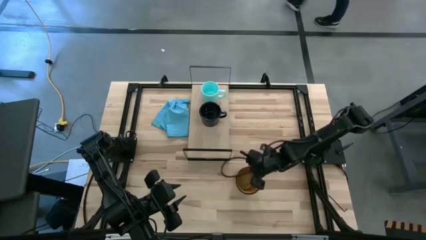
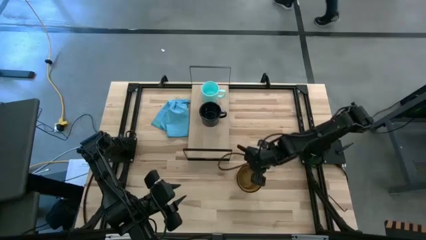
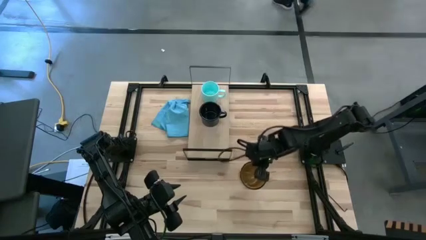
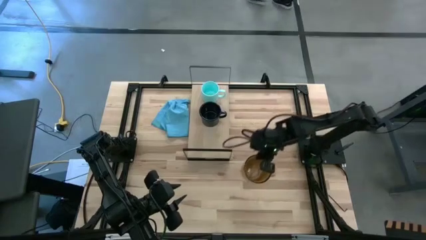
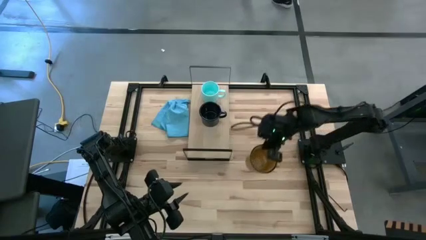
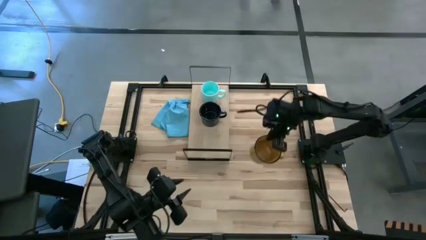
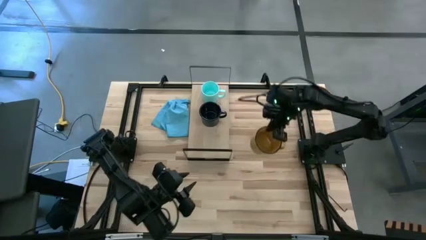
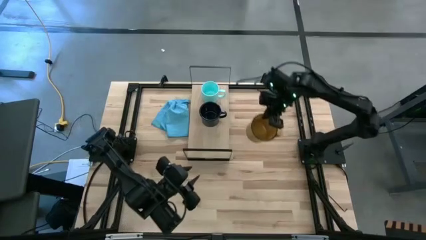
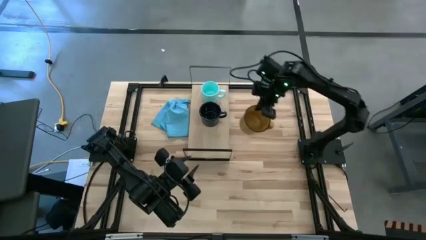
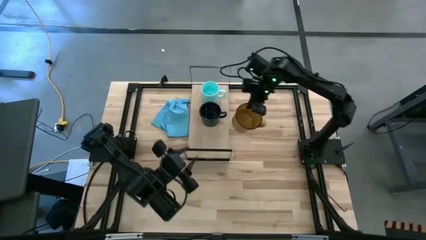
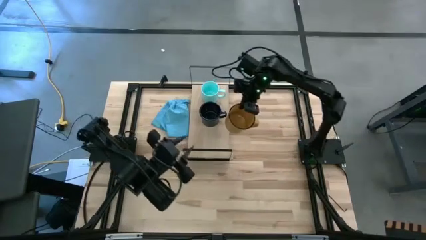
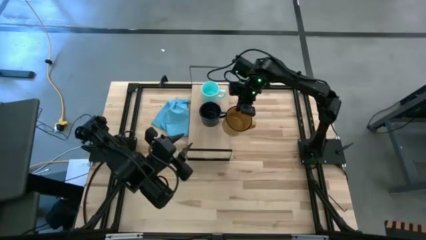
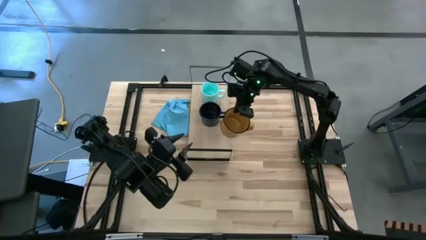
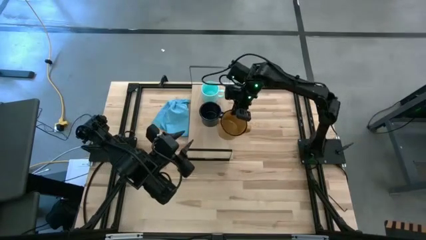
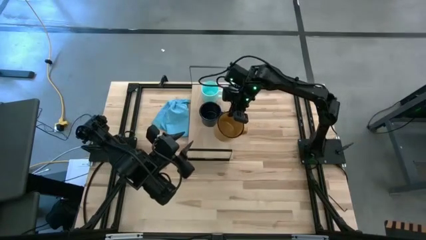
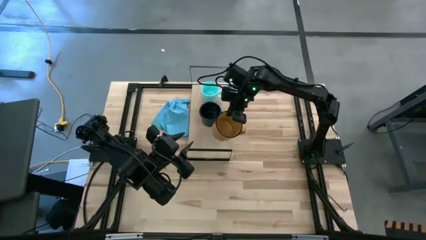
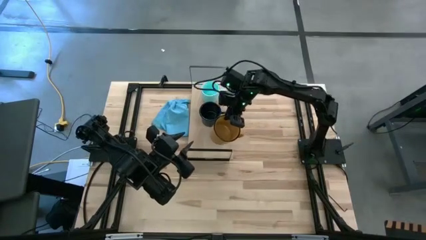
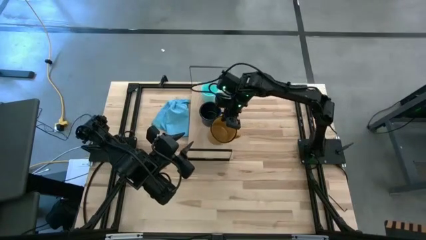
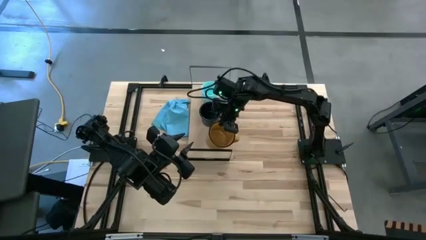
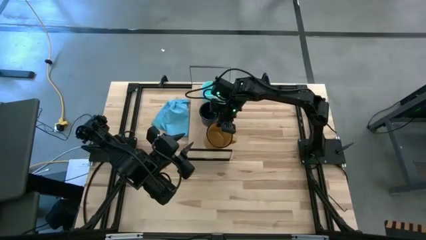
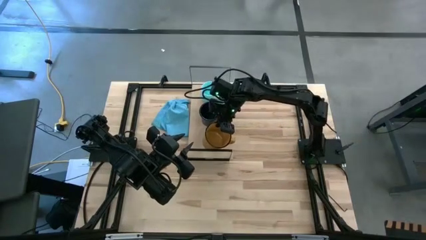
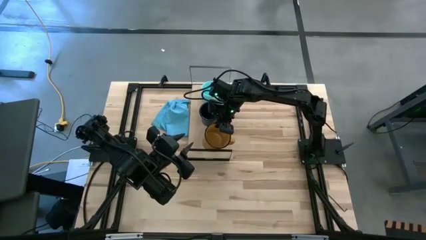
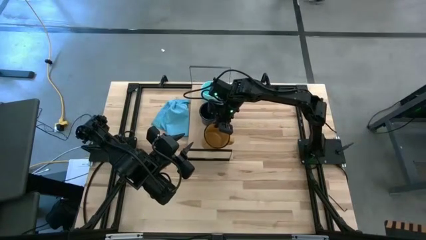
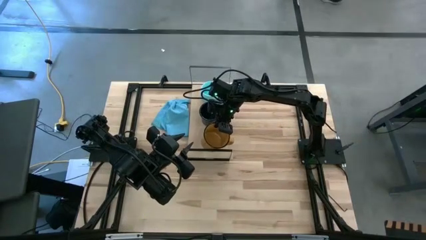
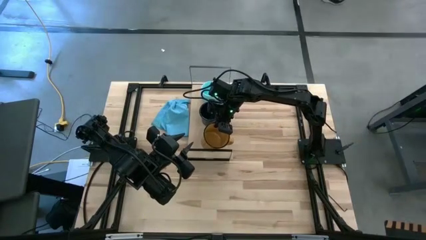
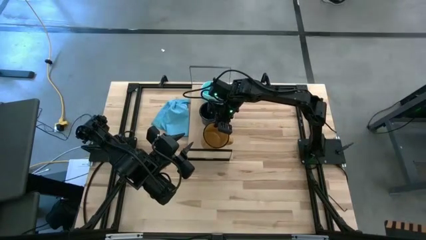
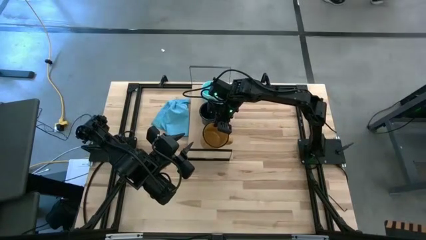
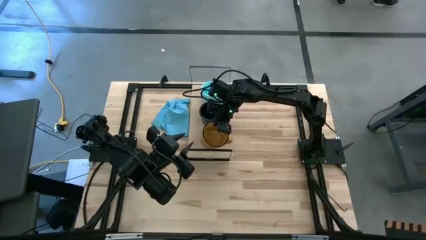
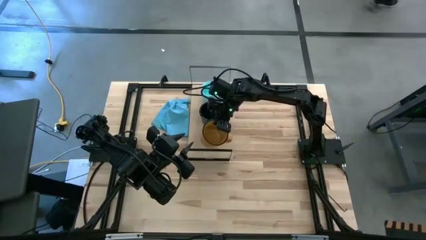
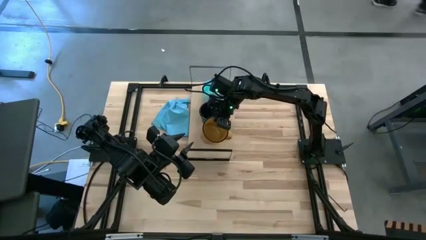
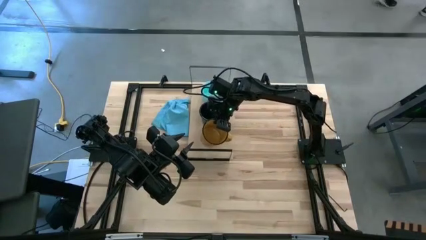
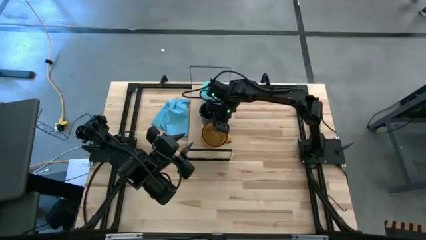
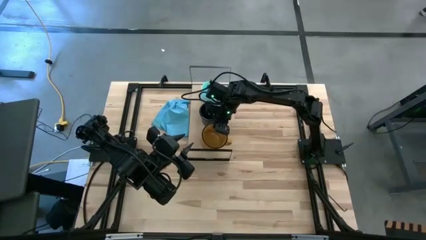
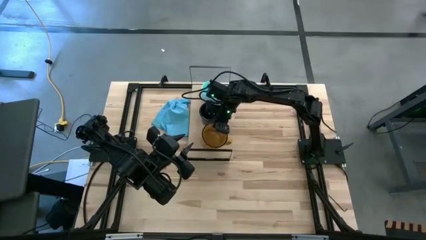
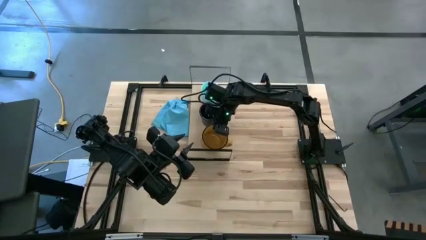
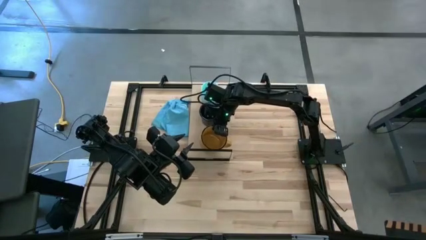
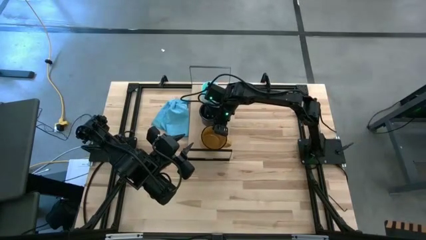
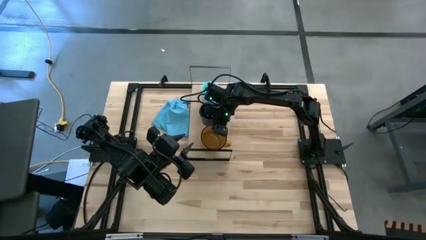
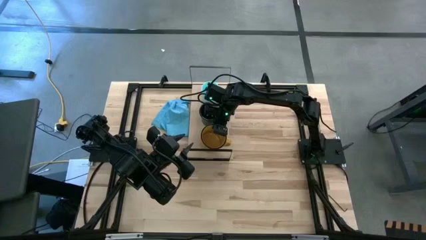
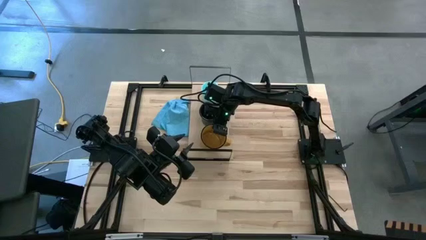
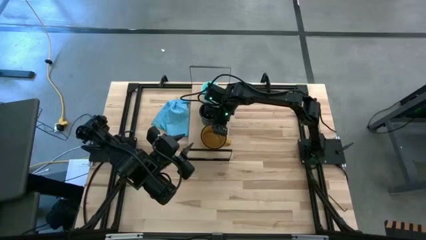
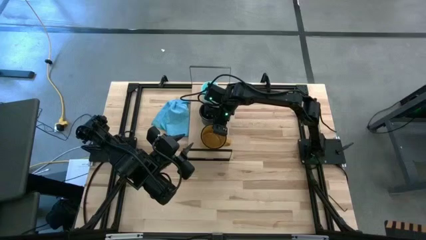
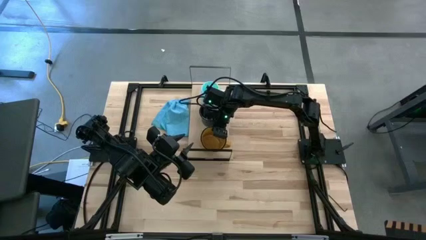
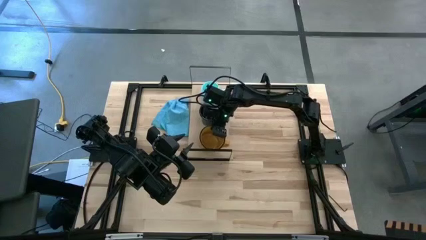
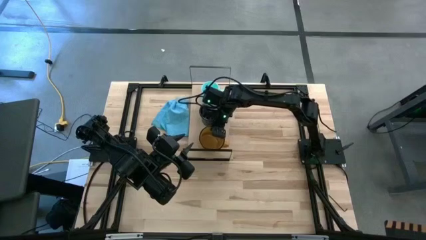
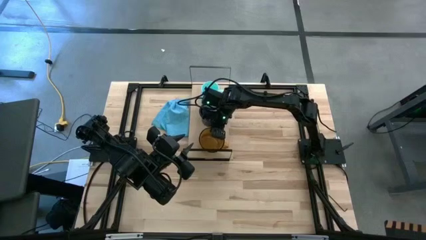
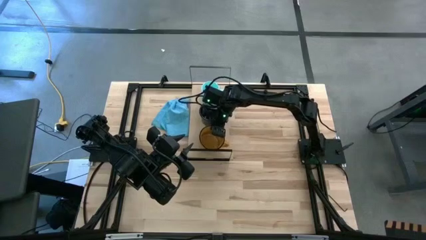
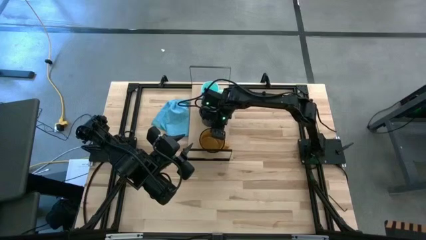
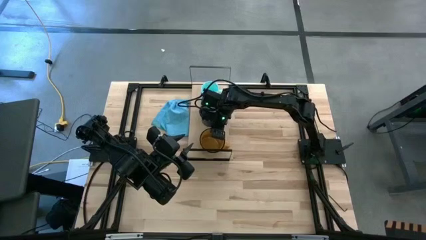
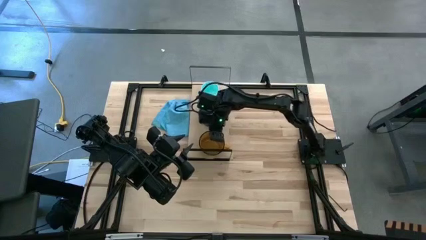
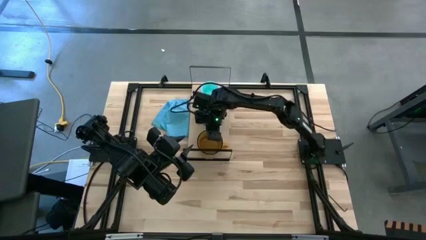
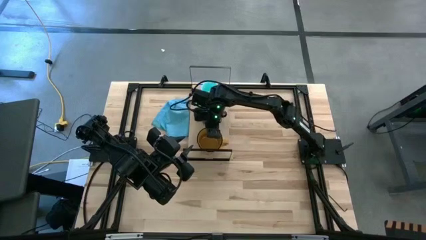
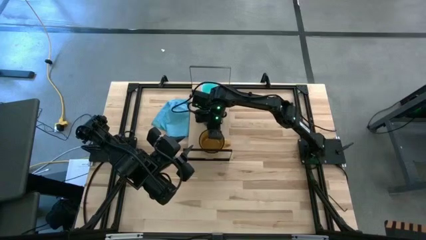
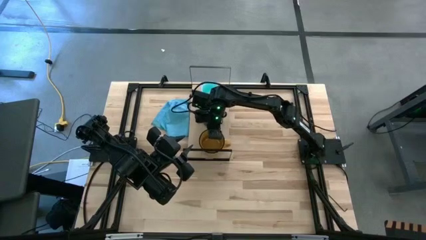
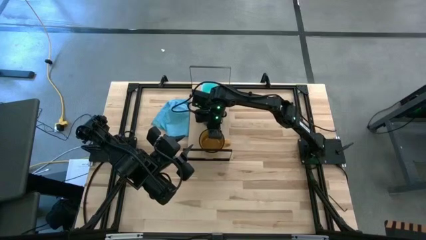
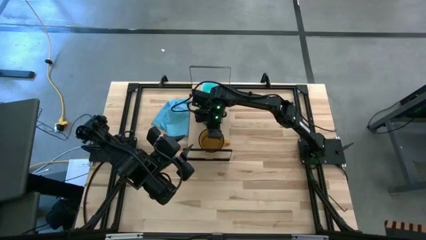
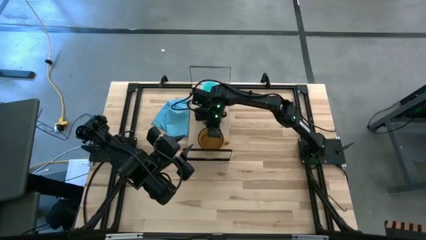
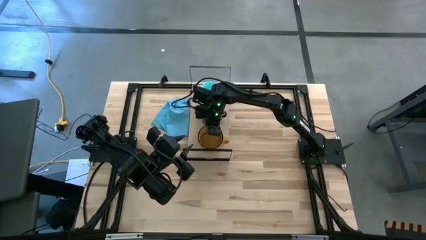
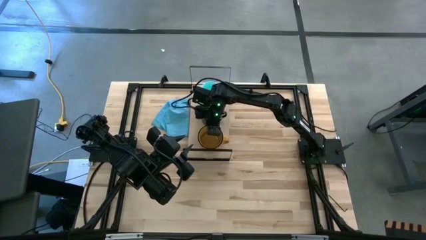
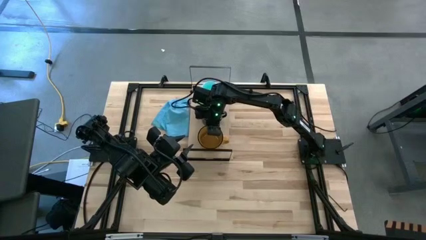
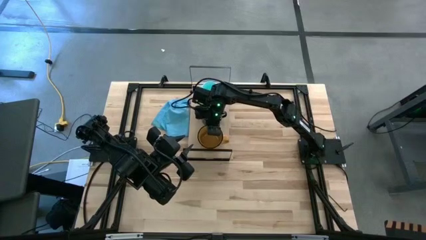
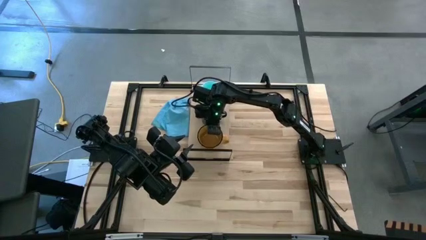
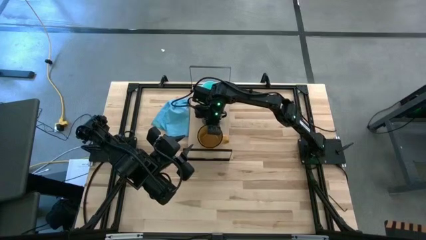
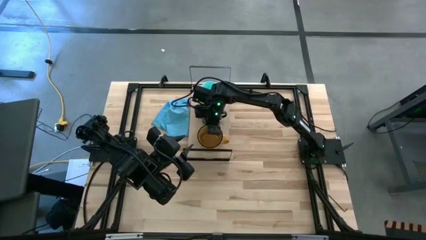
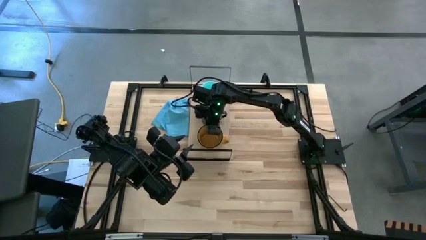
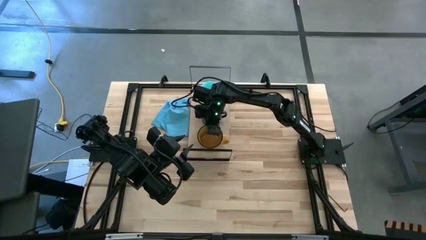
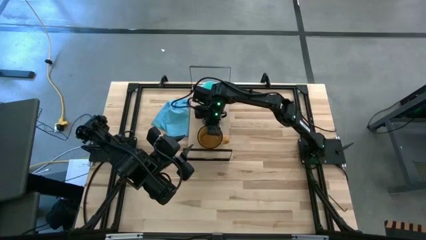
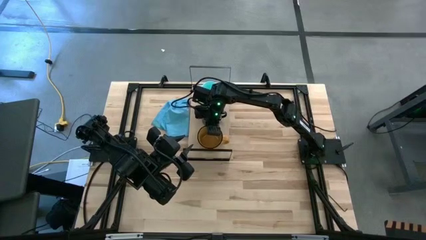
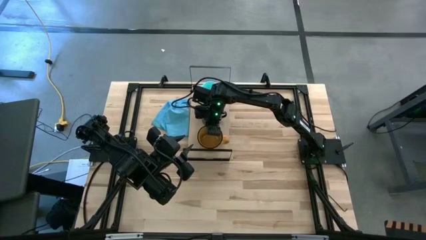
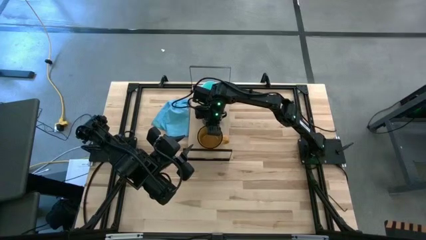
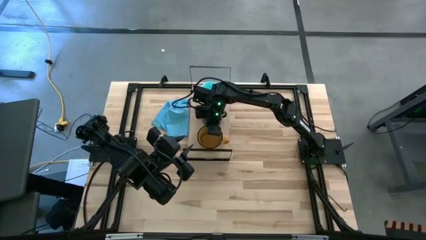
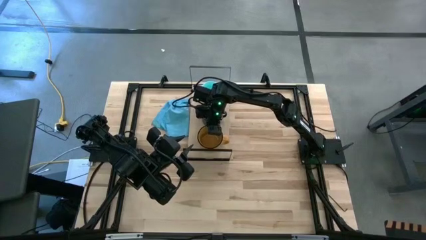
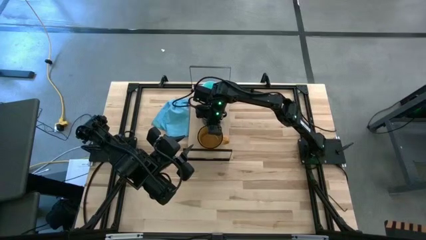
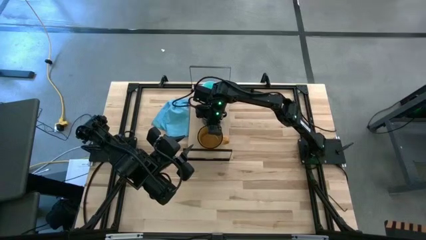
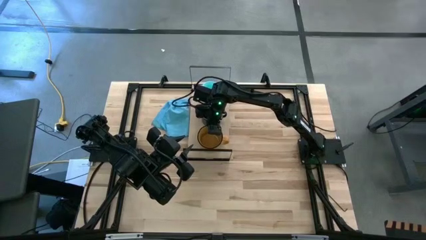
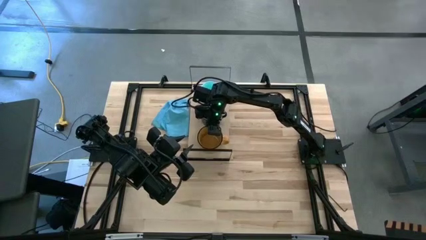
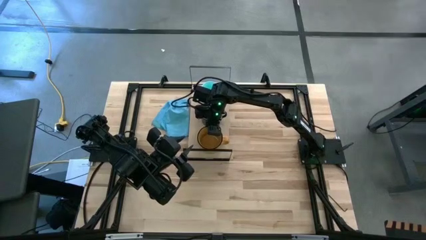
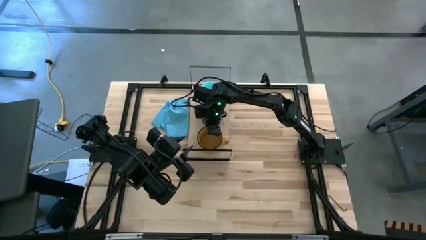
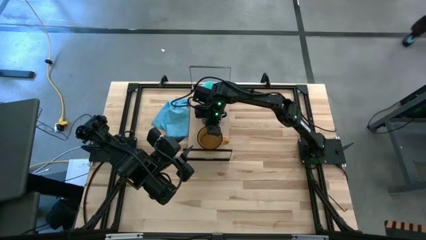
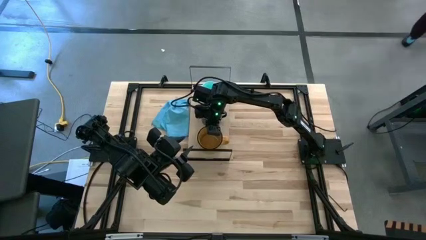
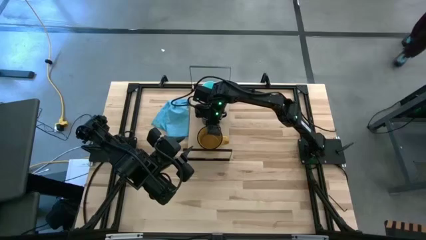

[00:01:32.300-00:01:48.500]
Task: Stack small to large cups/mugs on shelf
Put the yellow mug on the shelf
